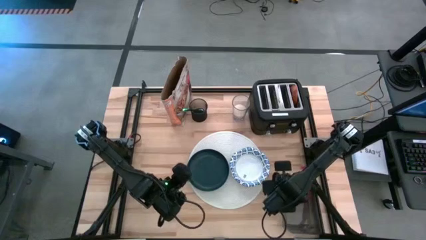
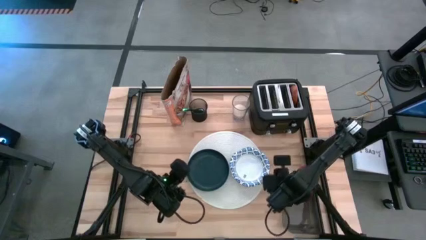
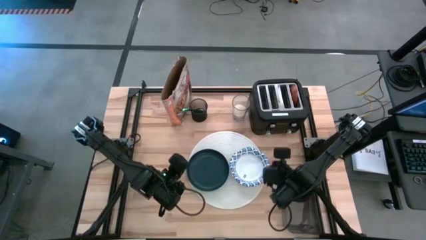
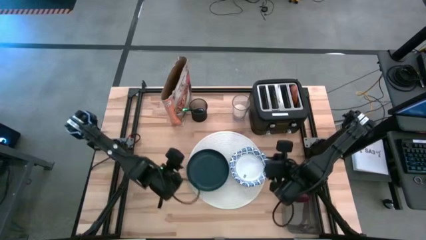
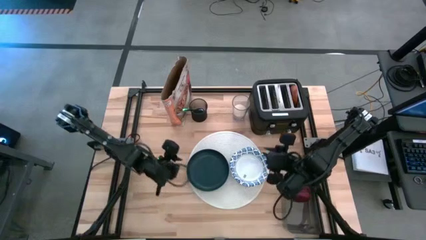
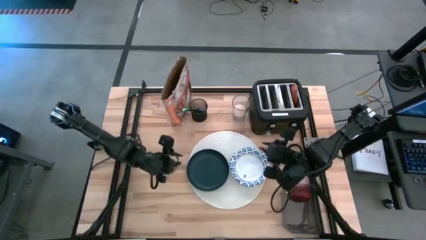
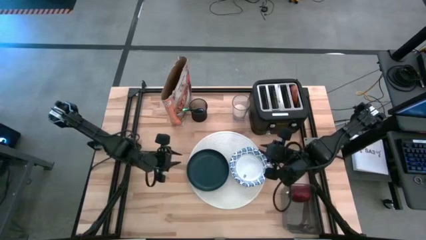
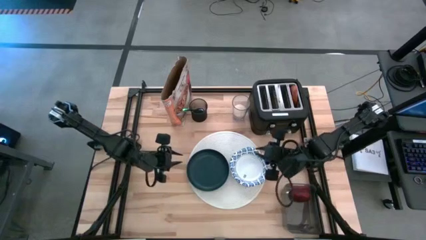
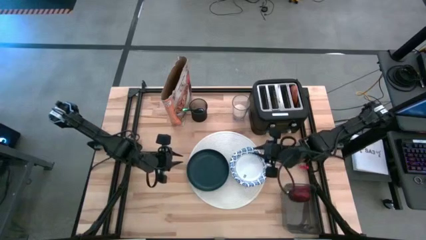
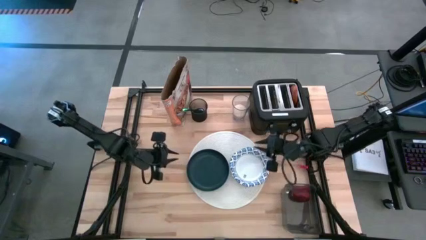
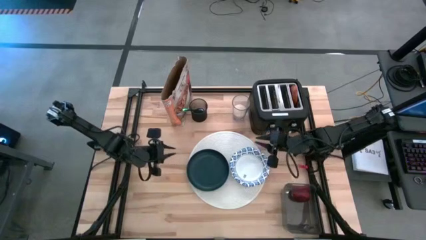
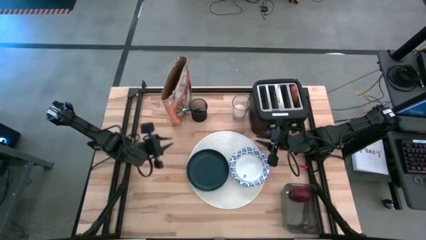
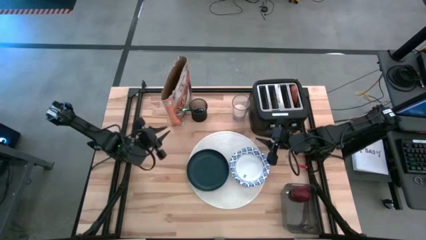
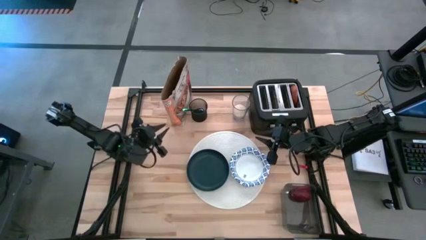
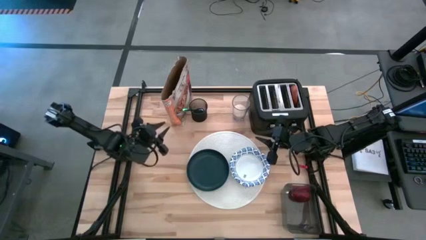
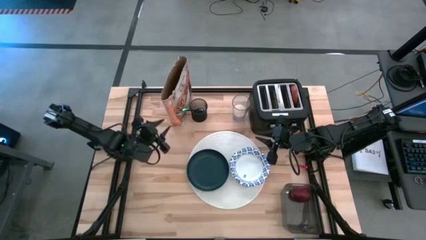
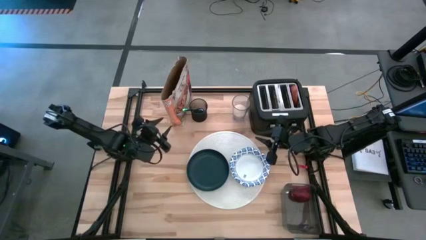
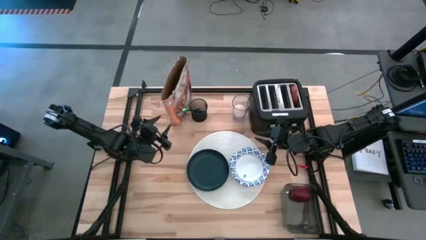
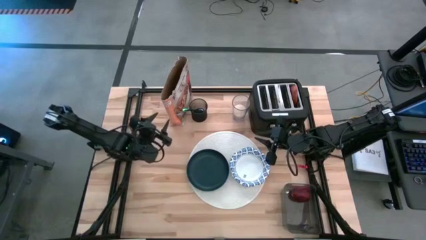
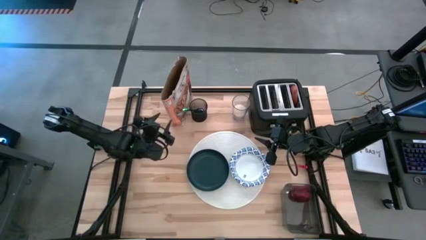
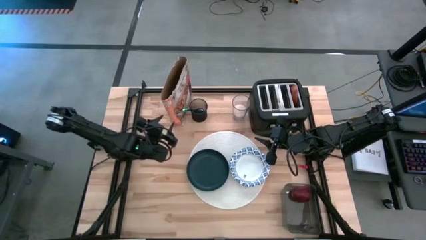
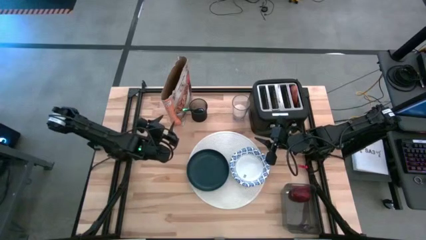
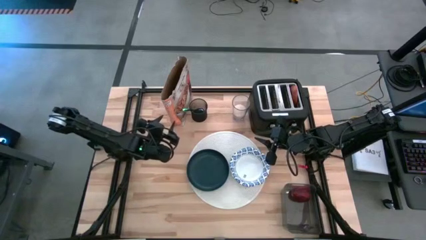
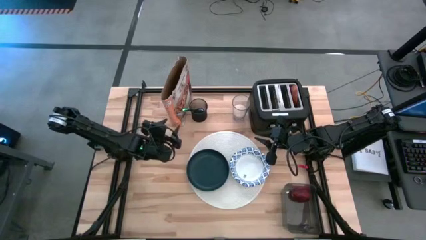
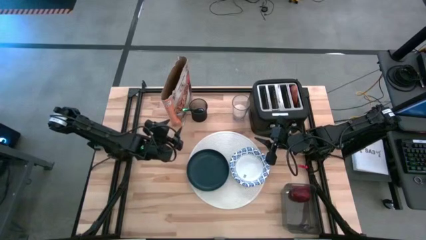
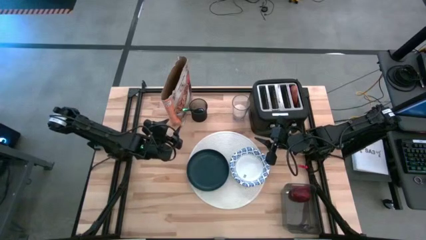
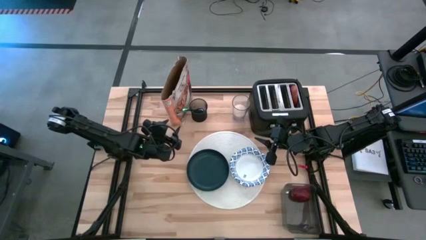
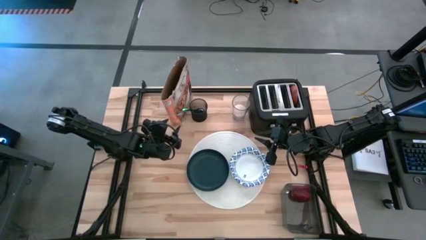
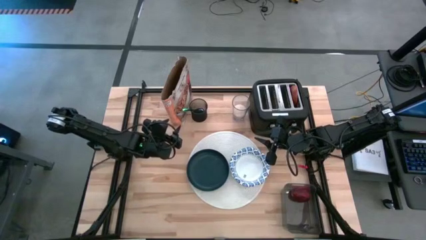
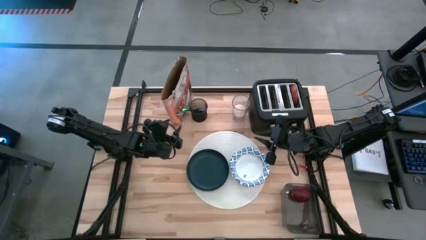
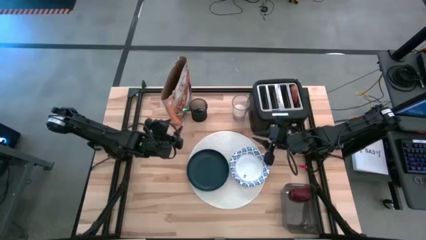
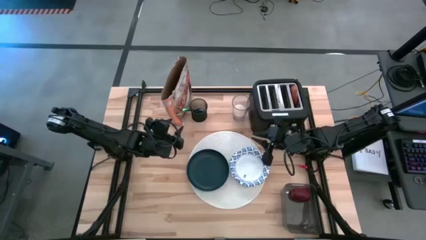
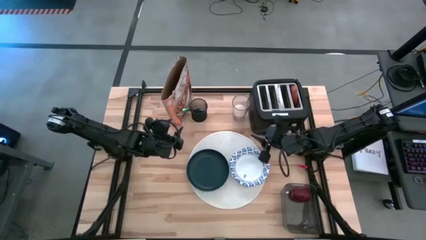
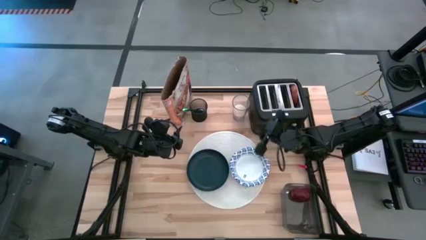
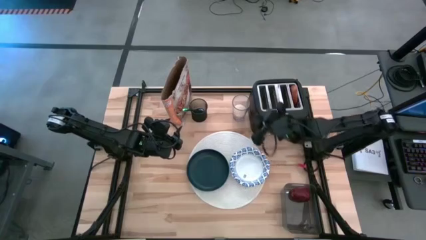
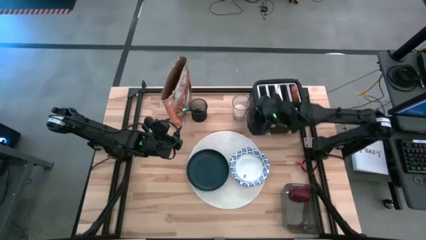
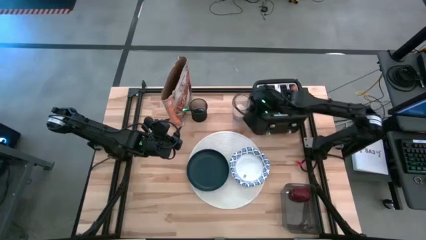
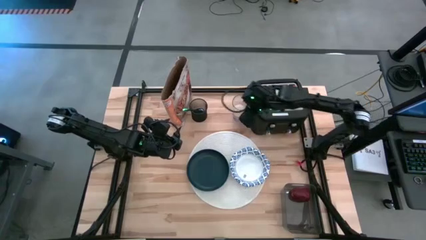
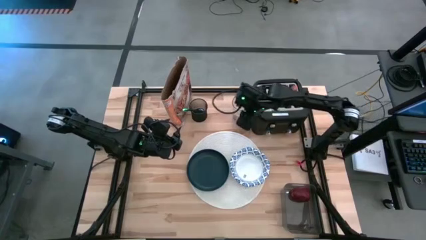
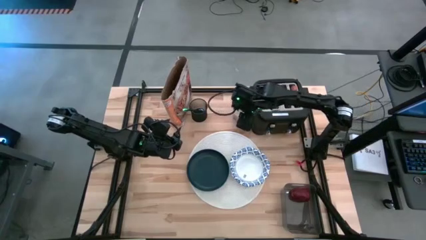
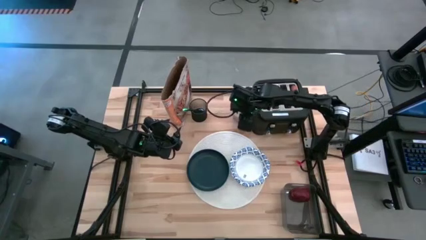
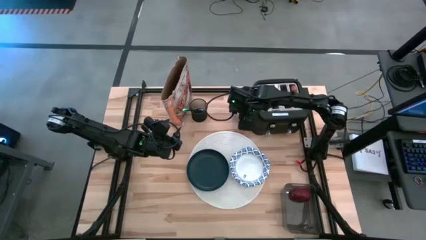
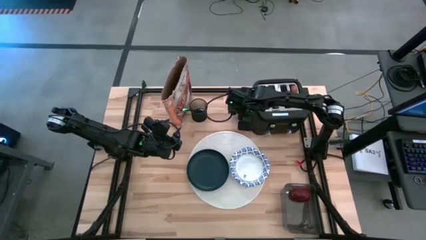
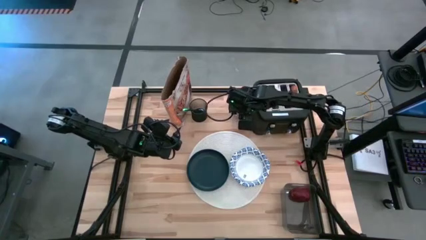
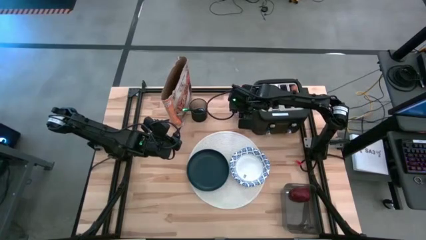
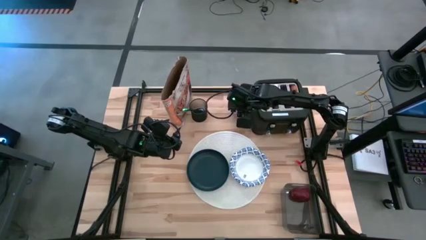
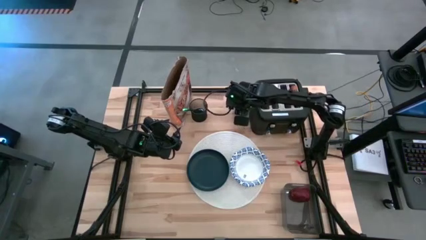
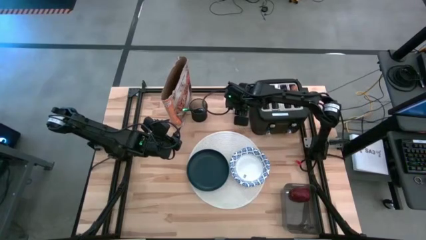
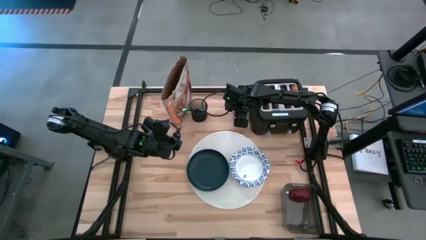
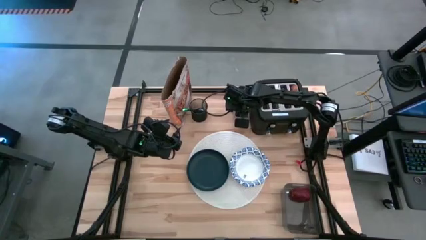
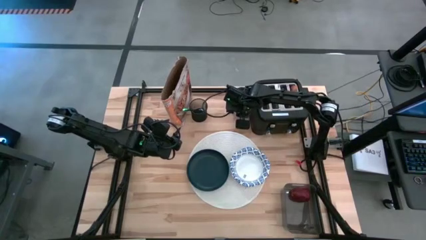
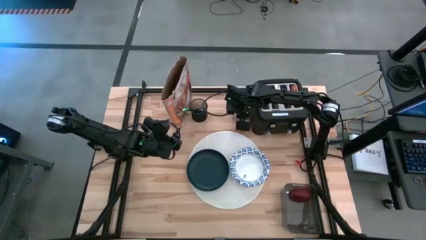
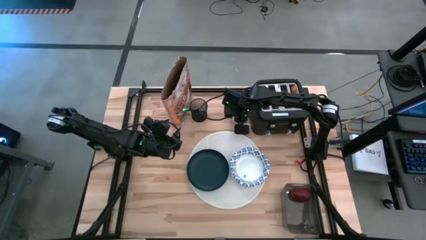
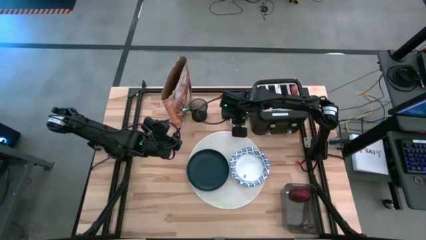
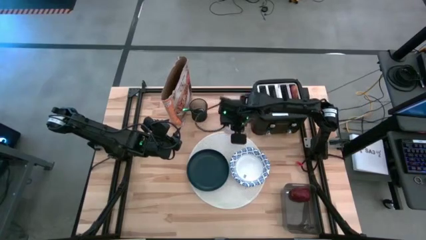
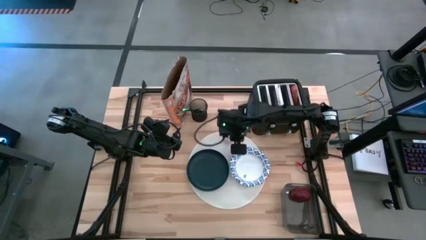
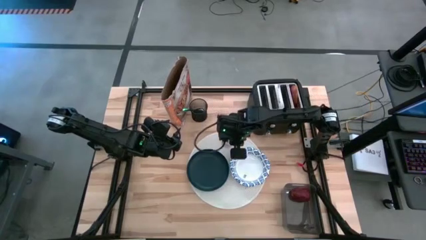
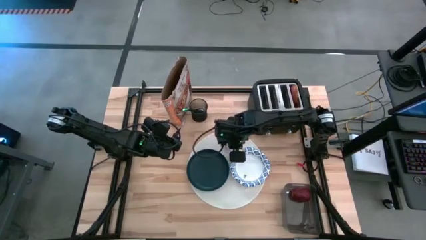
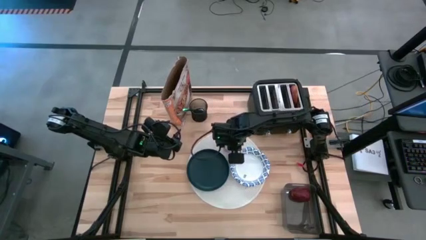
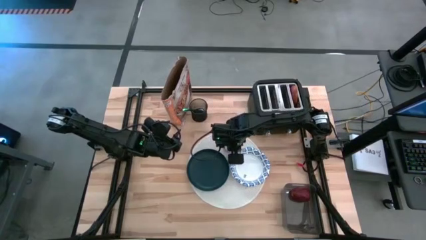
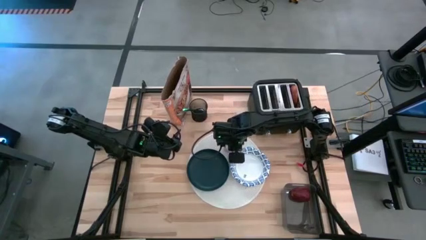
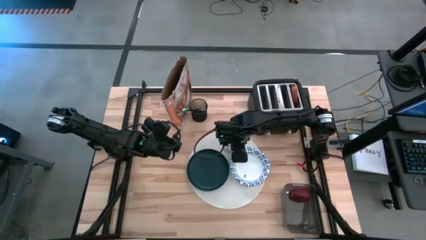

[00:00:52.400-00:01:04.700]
Task: Arrange a breakfast setting
Put the transparent glass to the top right of the dark blue plate on the white placemat

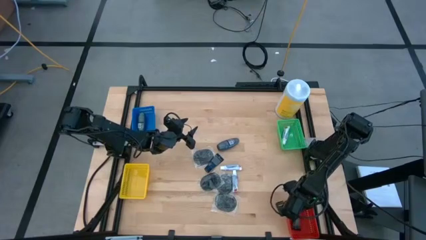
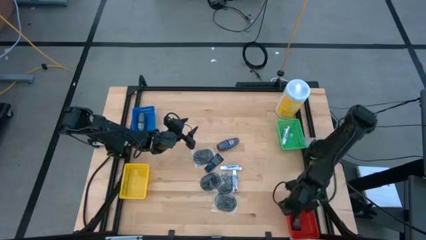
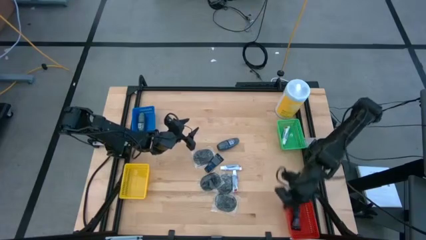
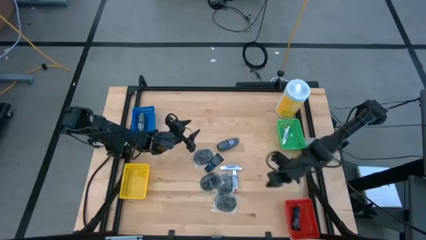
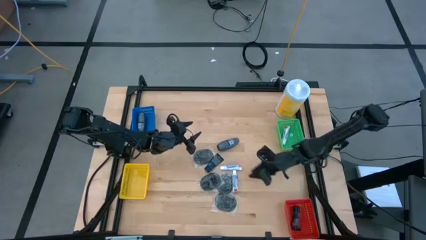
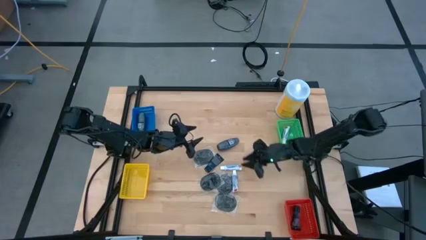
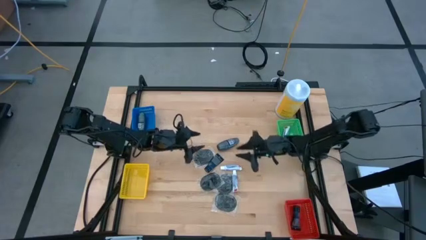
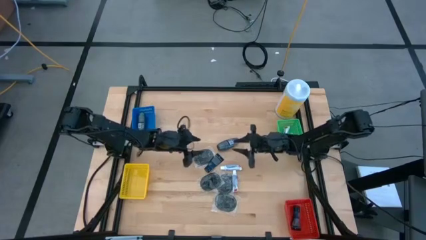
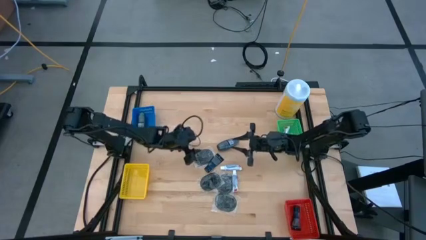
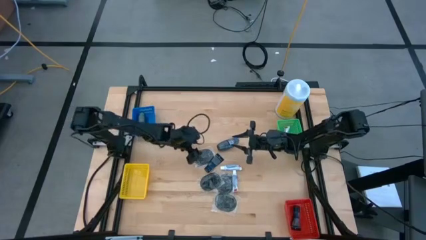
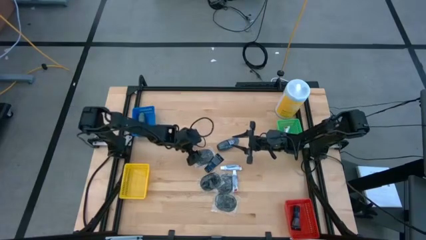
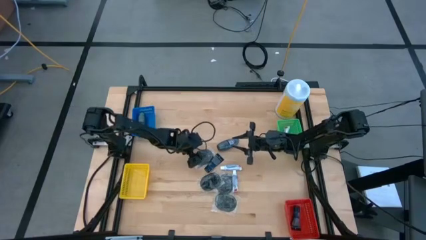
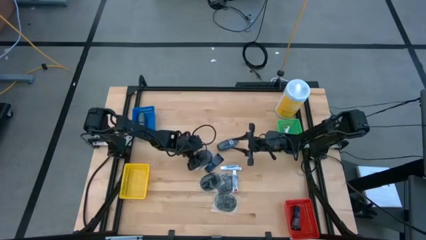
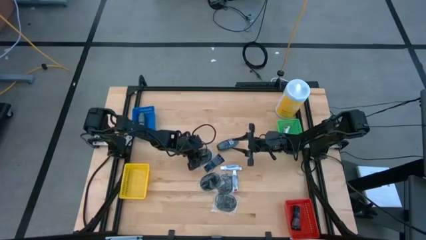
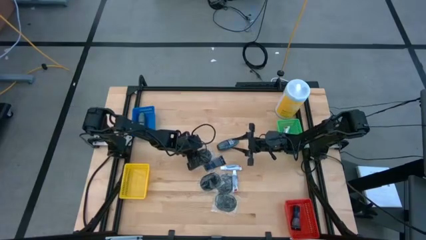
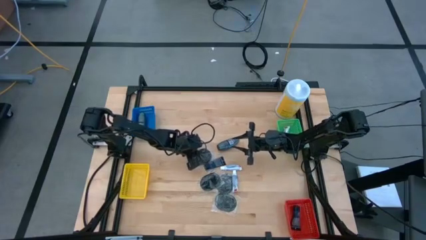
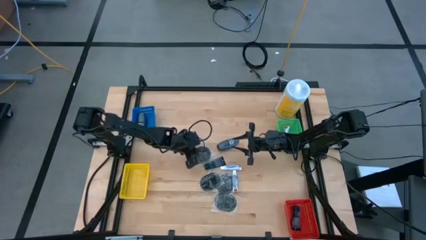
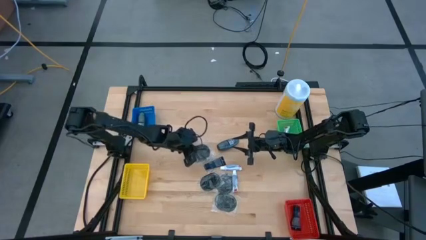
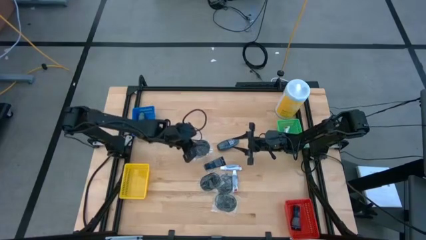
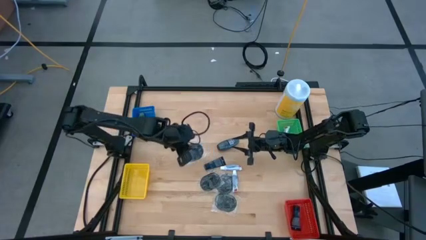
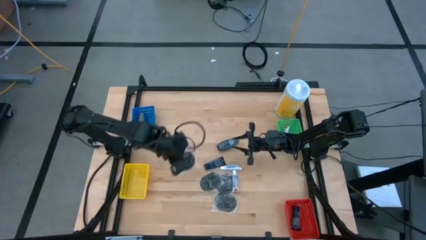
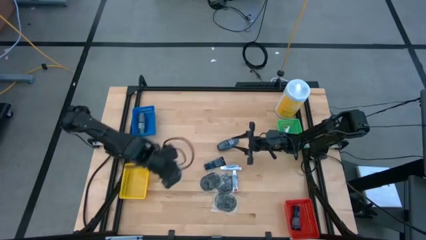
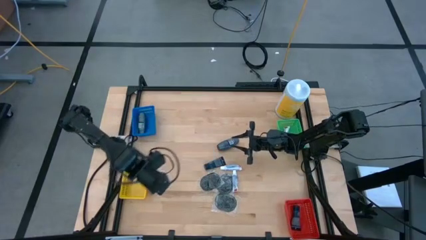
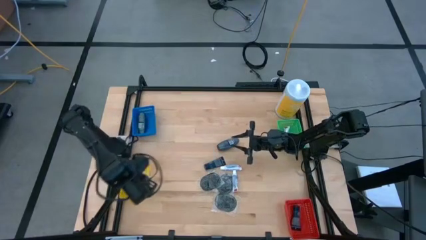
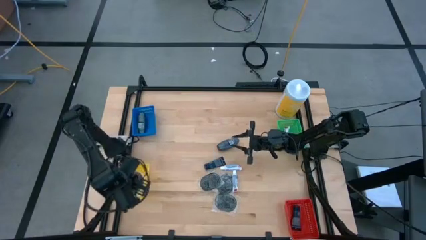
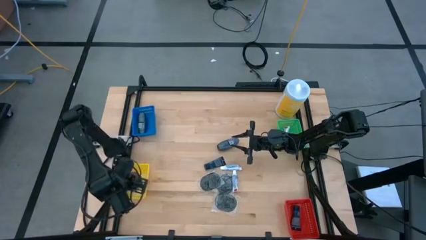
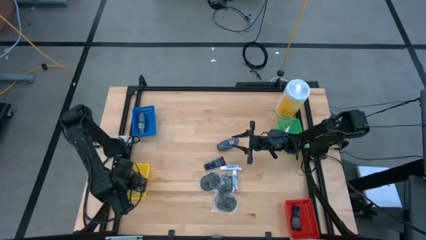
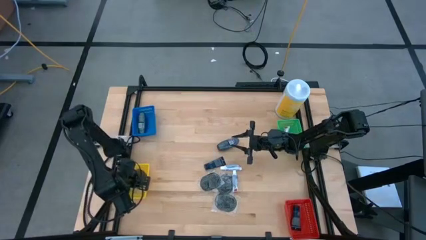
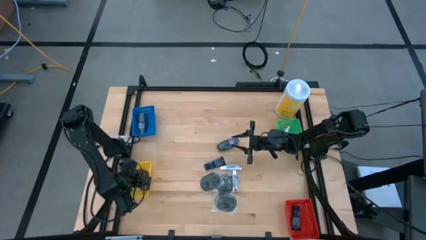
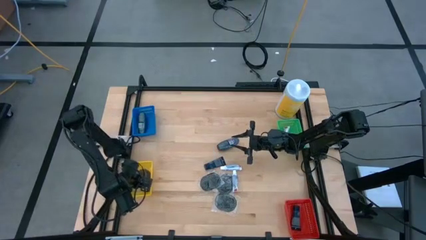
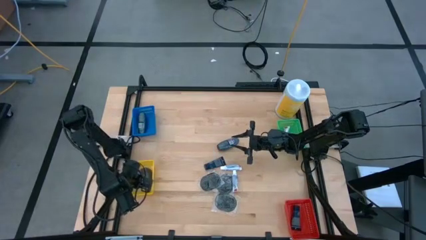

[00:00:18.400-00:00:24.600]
Task: Pick & Place Travel size toiletries
Put the black hairbrush into the yellow bin
